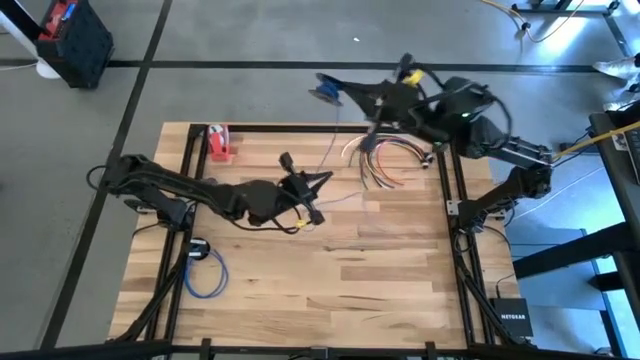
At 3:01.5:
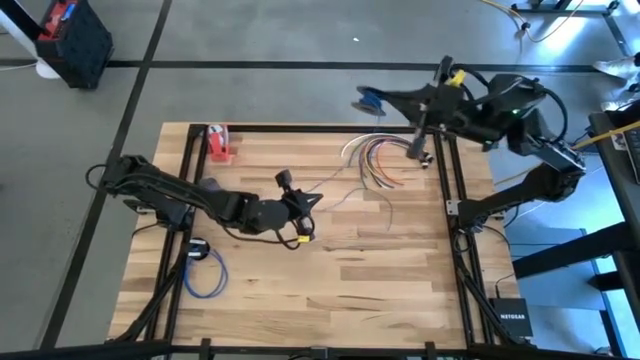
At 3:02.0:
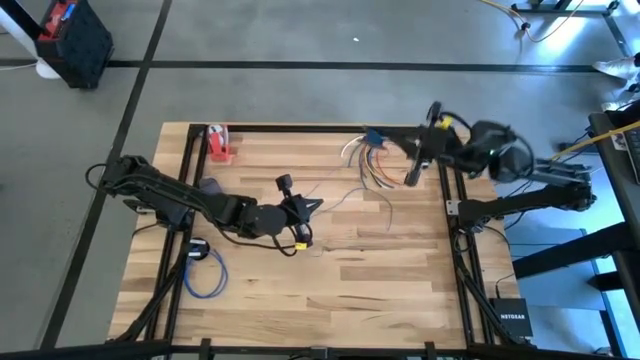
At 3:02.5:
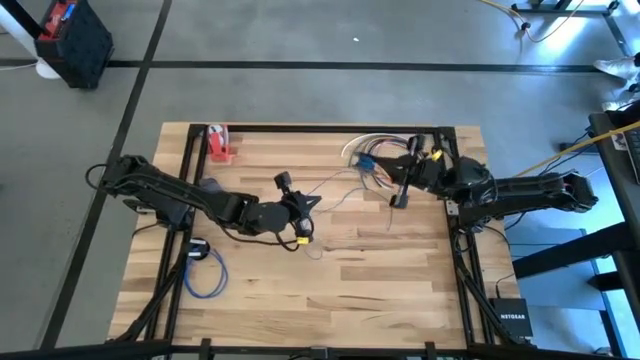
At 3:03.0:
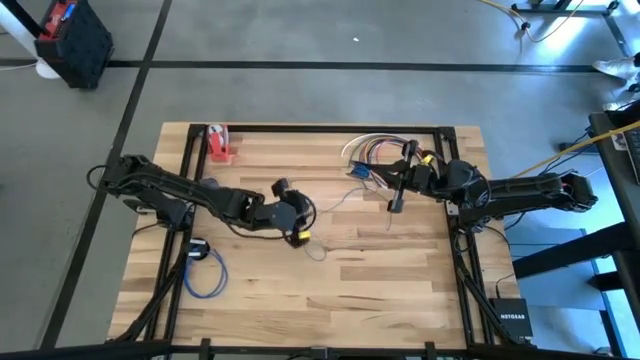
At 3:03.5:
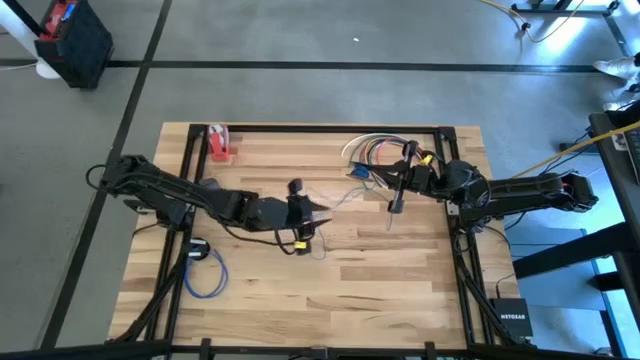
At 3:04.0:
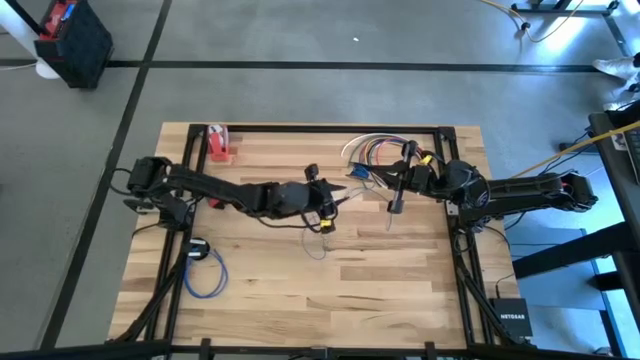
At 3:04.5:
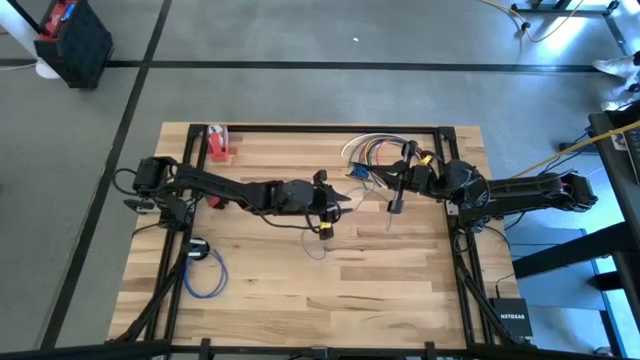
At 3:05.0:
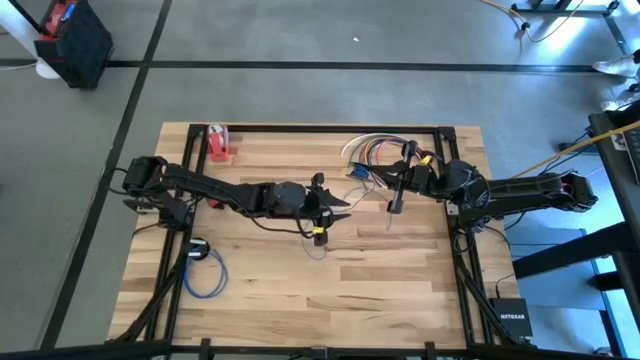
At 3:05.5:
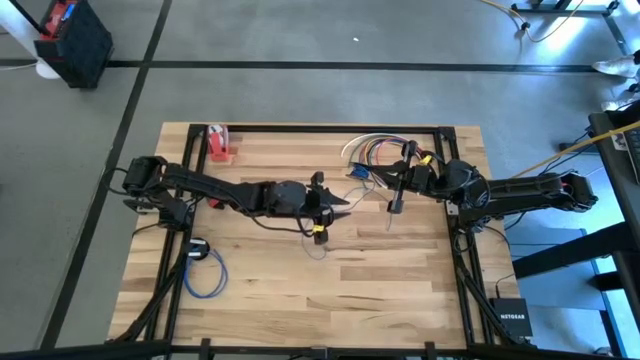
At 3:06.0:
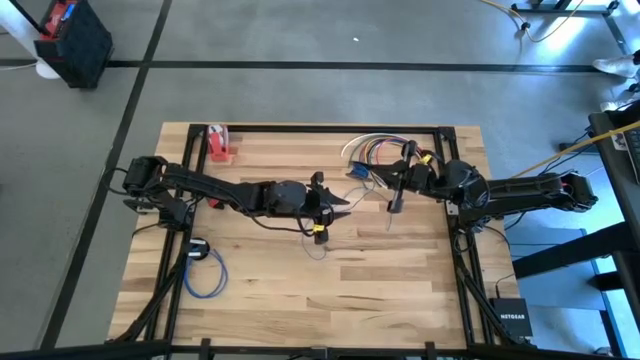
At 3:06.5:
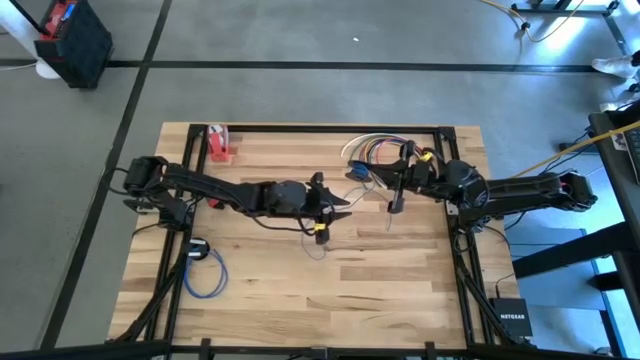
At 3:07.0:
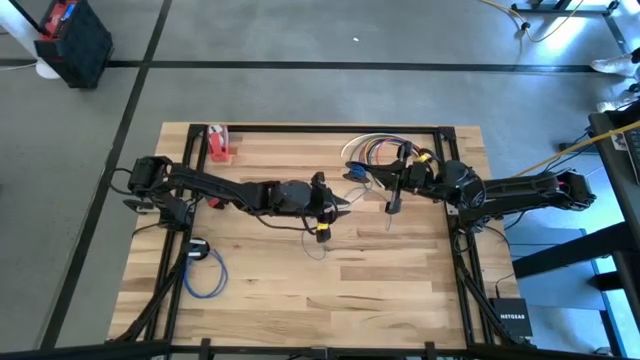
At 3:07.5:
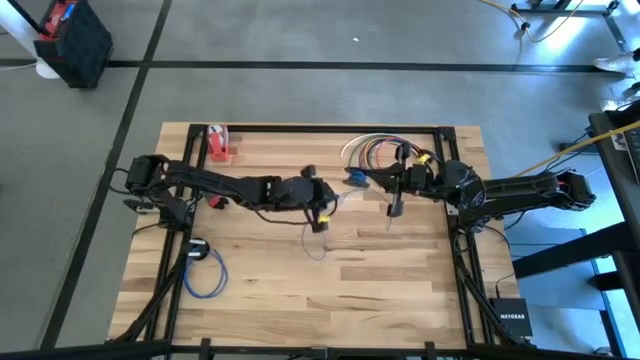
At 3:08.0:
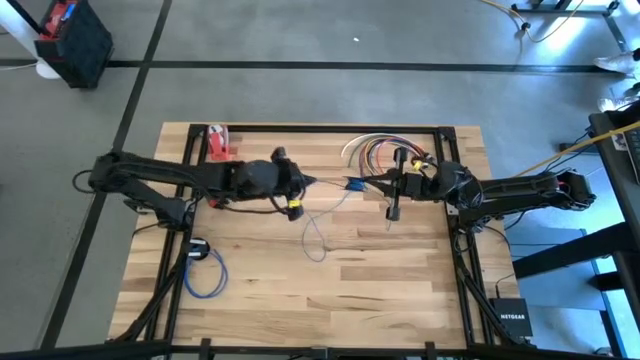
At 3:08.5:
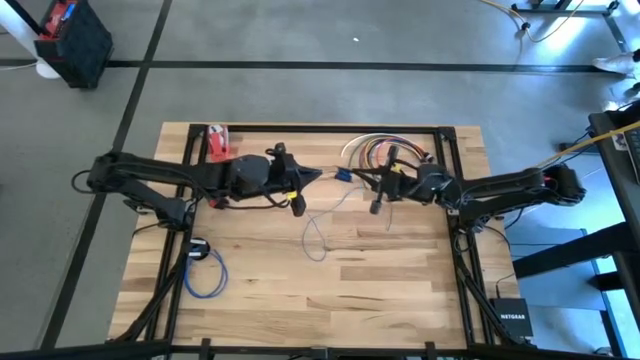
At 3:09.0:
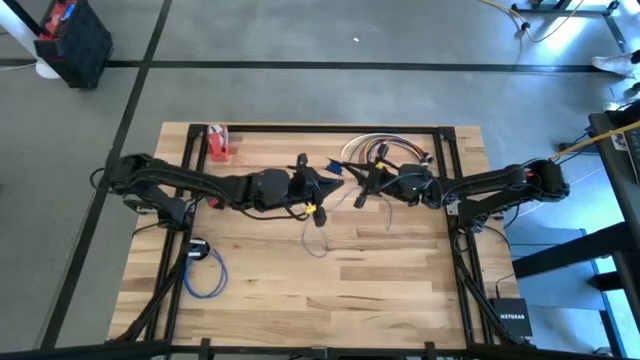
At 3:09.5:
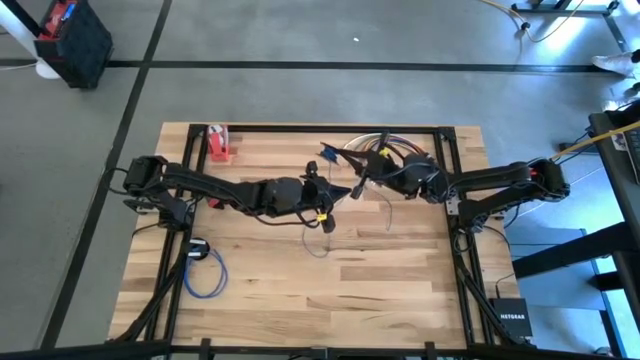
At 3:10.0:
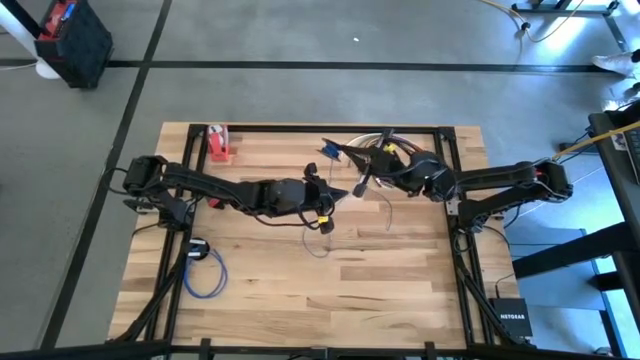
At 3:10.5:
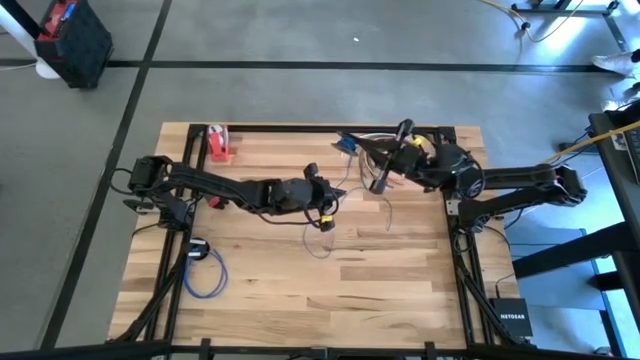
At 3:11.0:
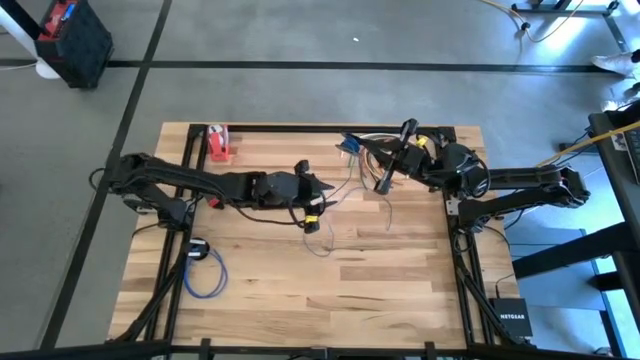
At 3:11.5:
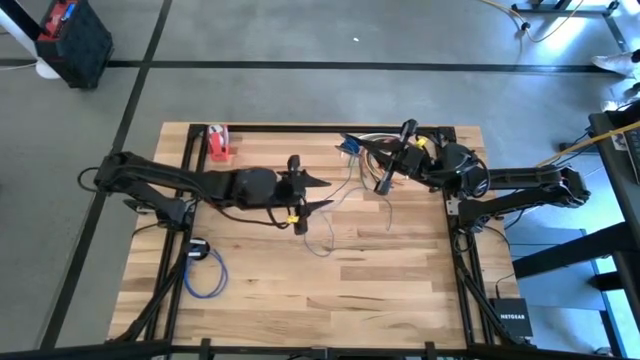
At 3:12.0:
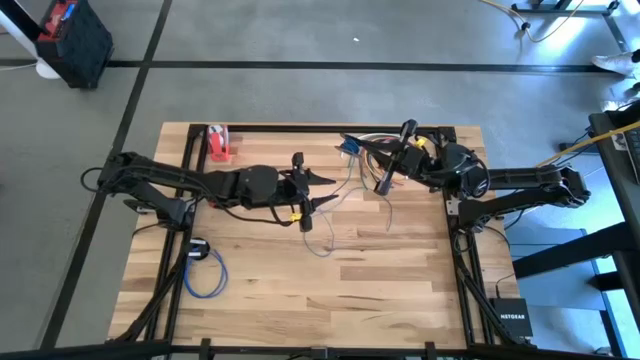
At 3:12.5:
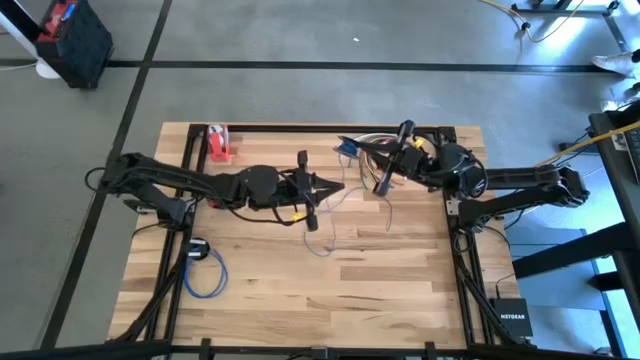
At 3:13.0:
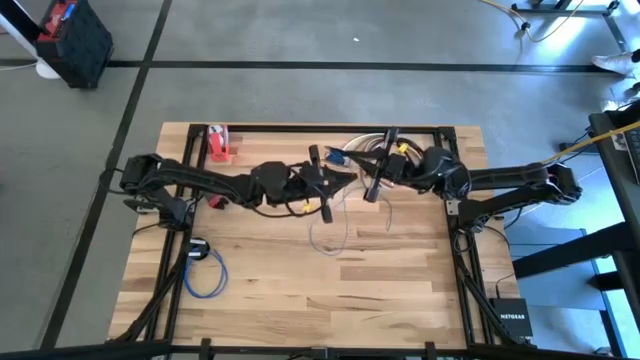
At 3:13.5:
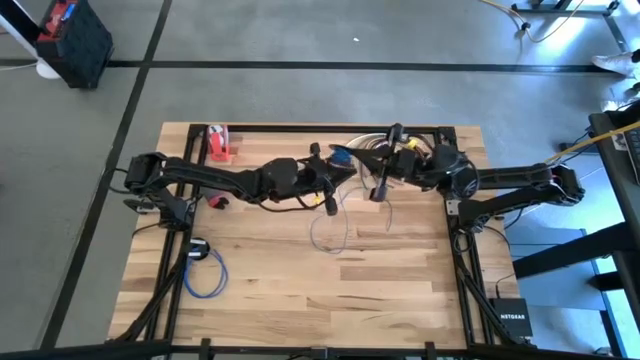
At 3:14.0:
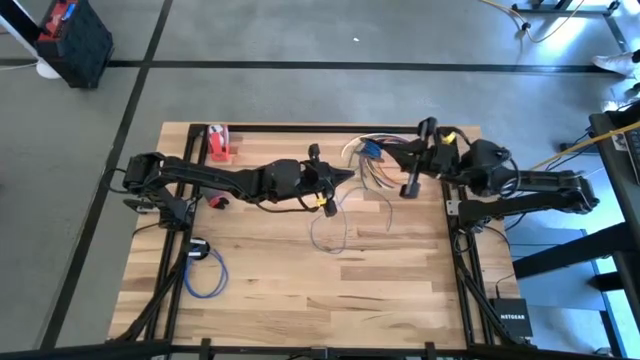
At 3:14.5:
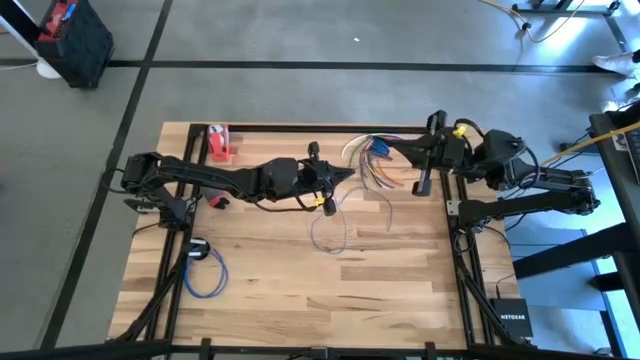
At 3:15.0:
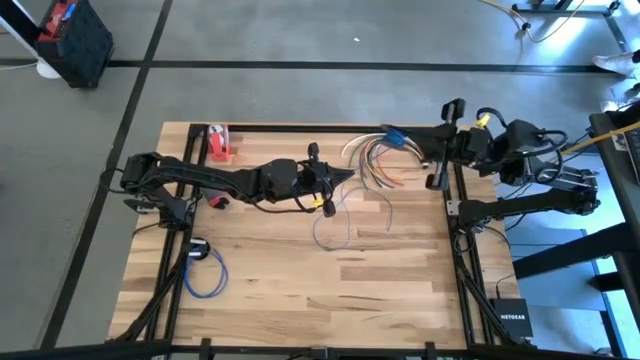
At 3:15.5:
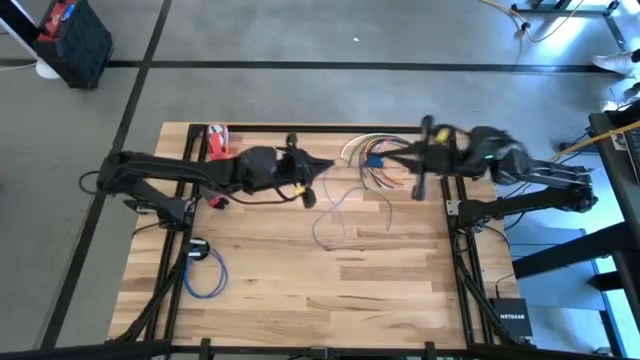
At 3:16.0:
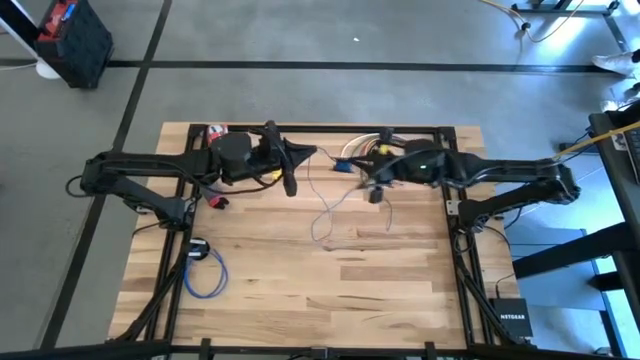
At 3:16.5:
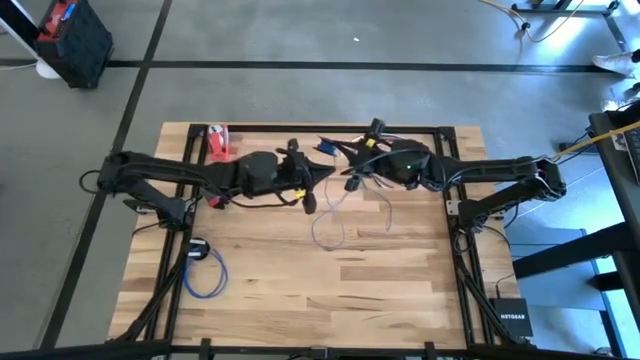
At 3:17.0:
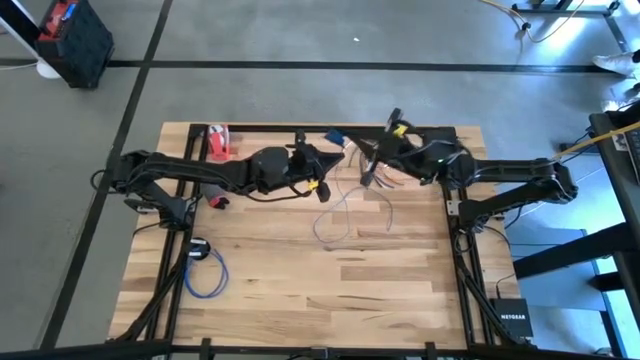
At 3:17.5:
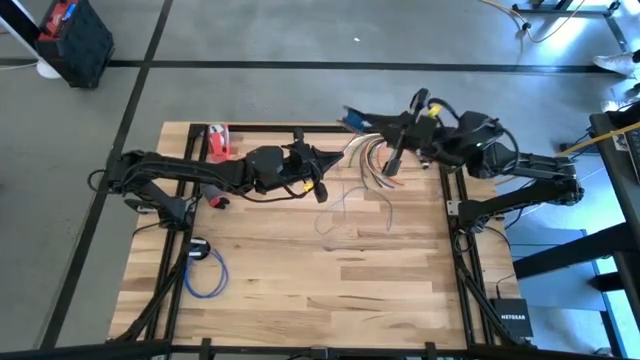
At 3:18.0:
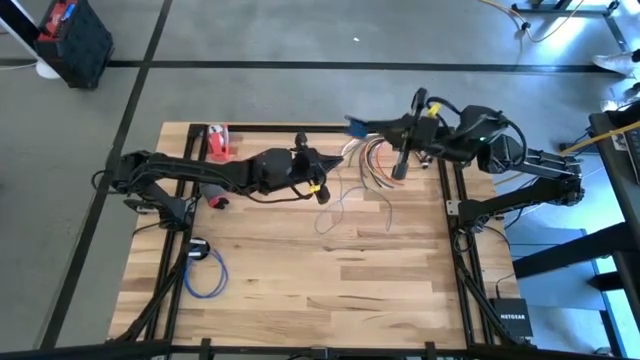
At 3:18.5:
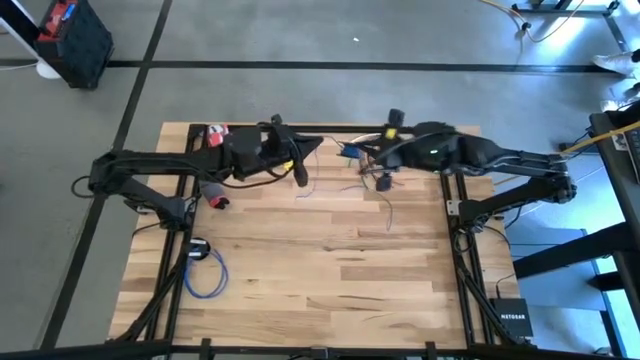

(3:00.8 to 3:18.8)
Task: Coil cords
Coil the blue cable wire on the black spool

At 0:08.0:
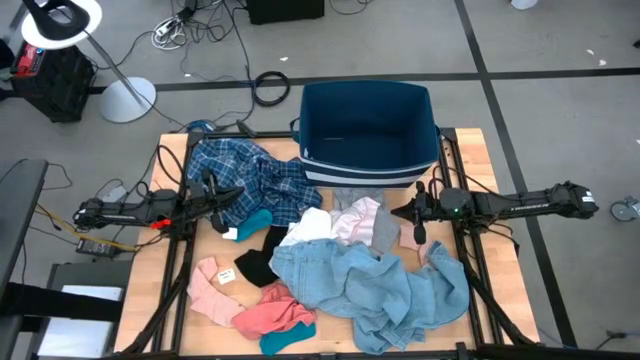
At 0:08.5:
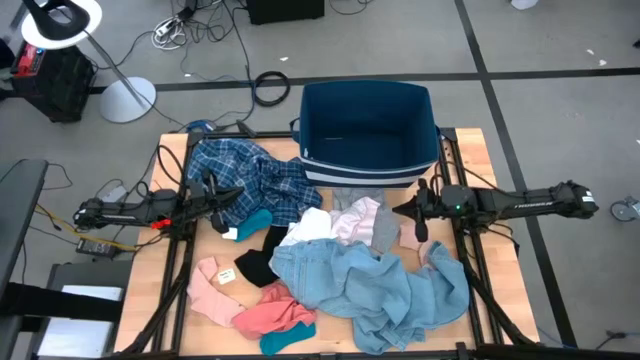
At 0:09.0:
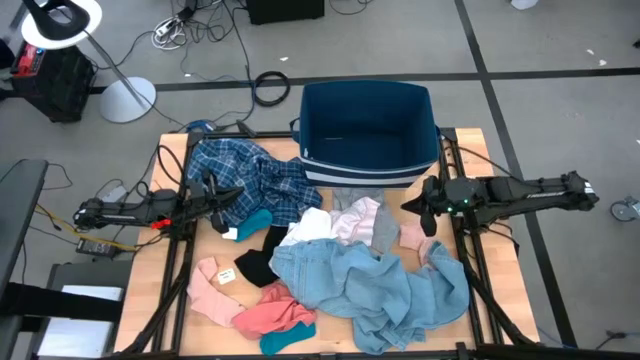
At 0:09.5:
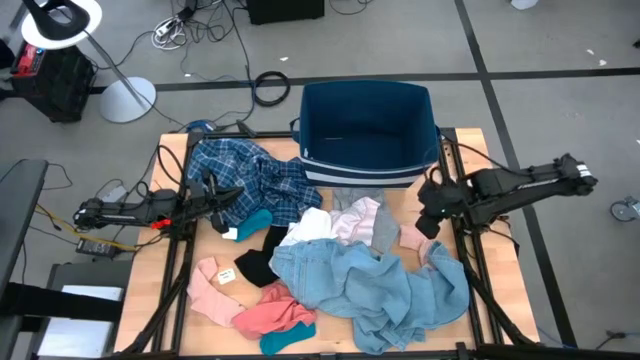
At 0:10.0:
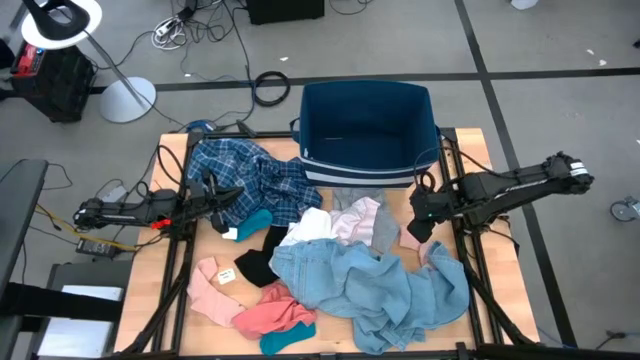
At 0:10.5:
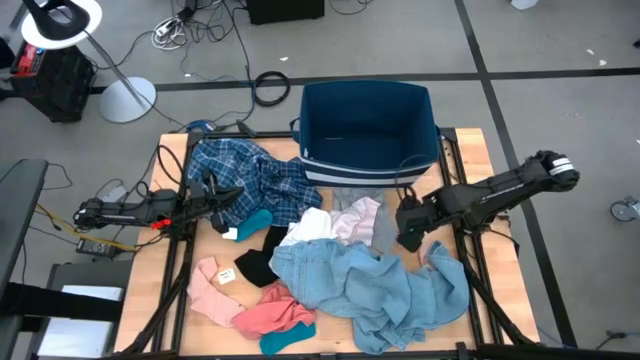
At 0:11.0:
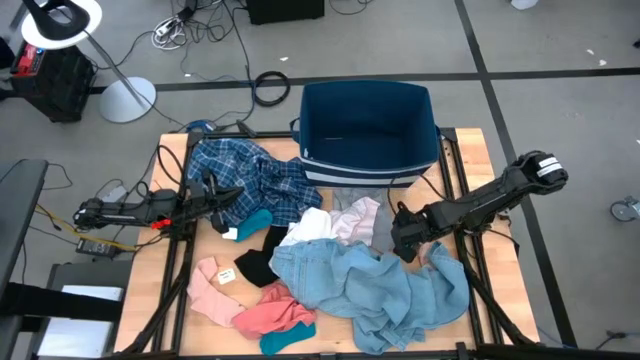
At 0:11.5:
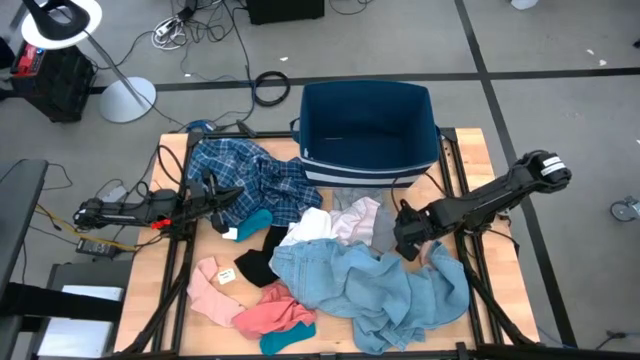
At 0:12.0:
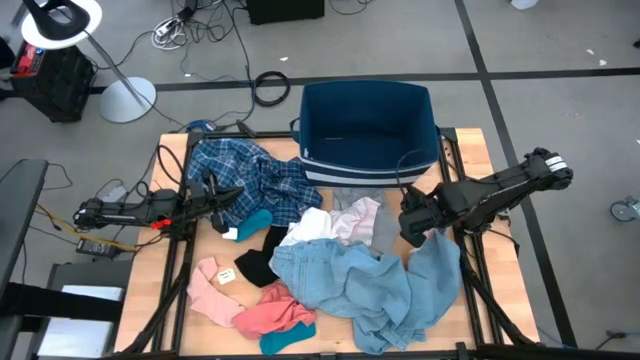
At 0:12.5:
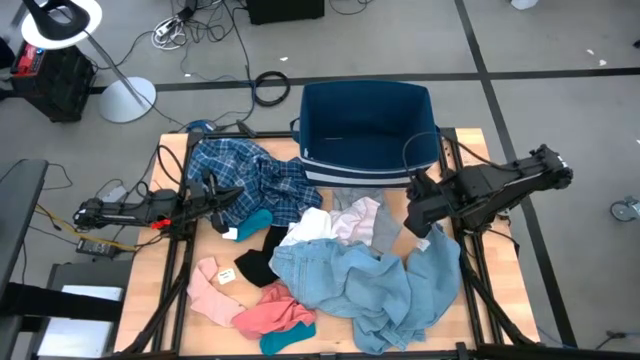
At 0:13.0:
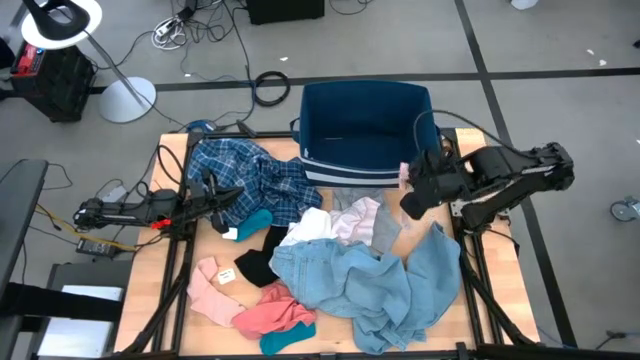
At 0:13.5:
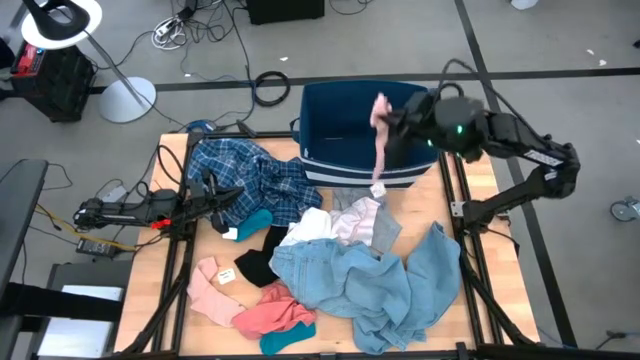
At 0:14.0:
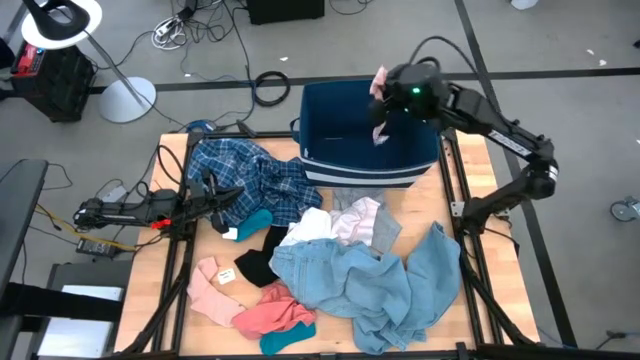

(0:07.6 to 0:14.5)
Task: Sort clothes
Put the light pink sock into the blue bin
